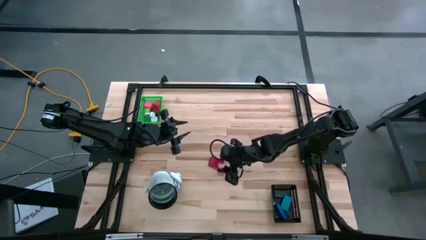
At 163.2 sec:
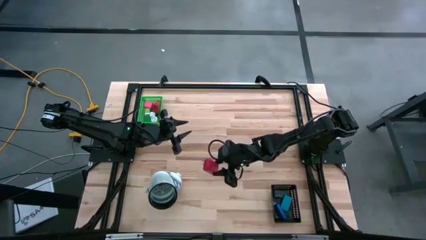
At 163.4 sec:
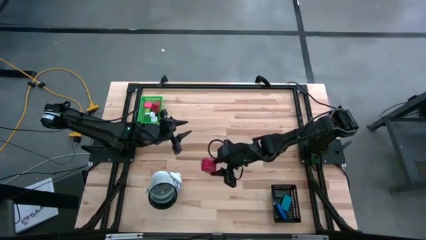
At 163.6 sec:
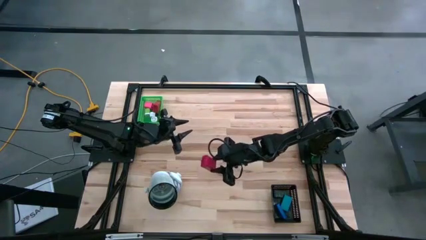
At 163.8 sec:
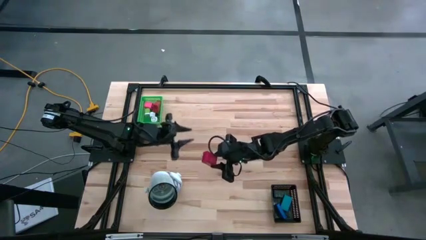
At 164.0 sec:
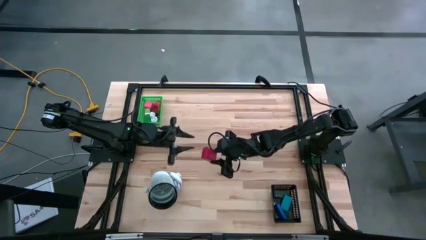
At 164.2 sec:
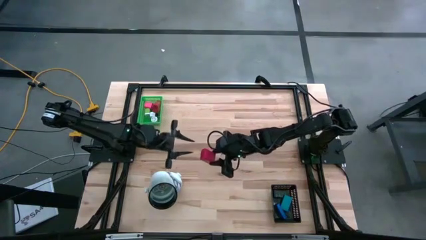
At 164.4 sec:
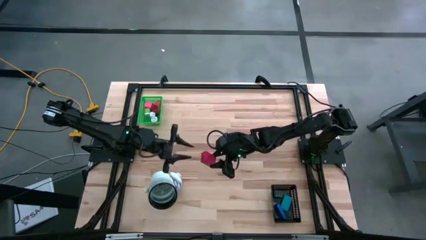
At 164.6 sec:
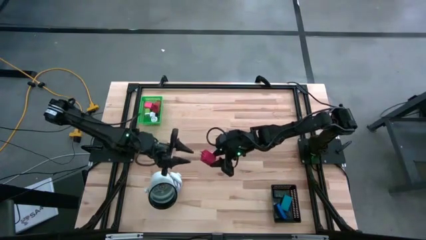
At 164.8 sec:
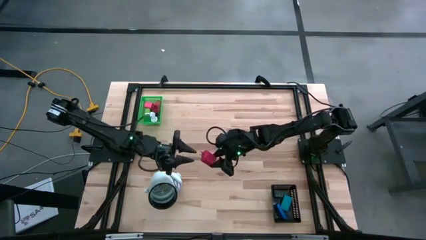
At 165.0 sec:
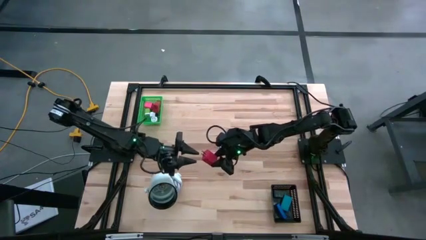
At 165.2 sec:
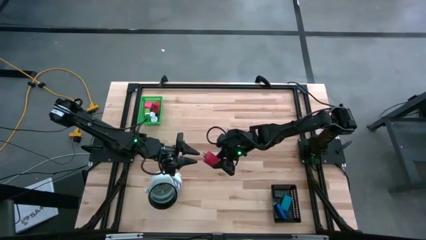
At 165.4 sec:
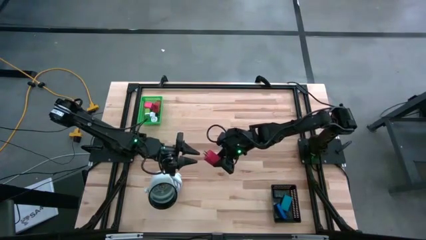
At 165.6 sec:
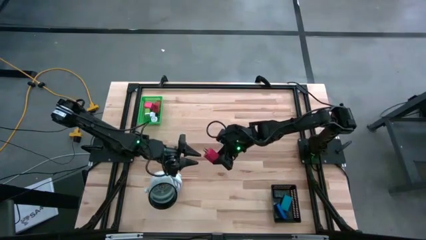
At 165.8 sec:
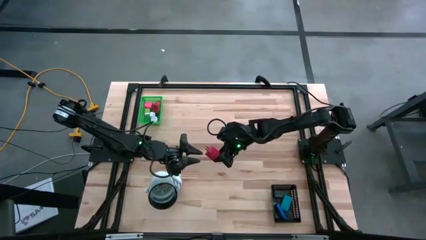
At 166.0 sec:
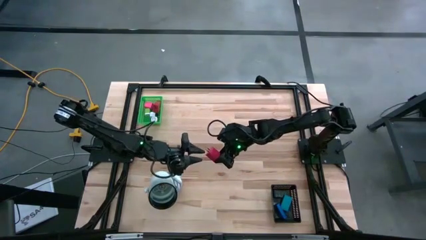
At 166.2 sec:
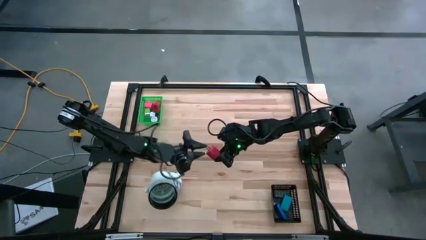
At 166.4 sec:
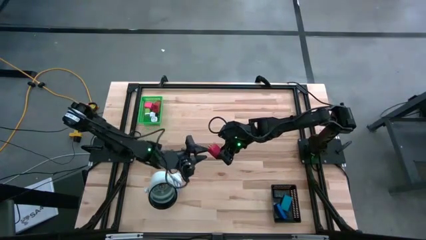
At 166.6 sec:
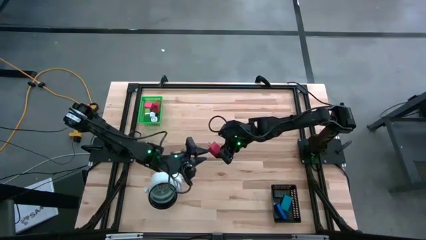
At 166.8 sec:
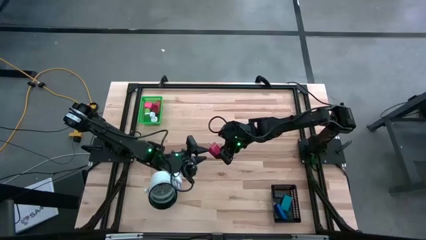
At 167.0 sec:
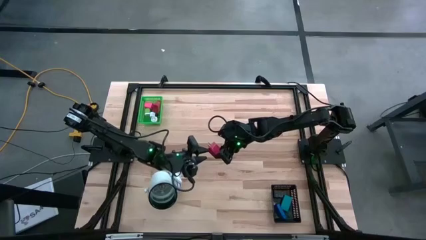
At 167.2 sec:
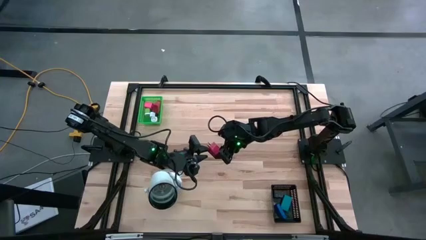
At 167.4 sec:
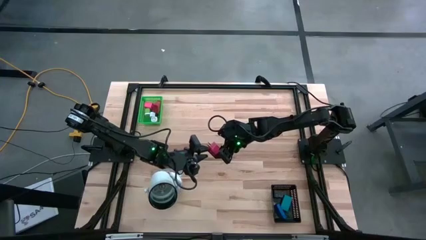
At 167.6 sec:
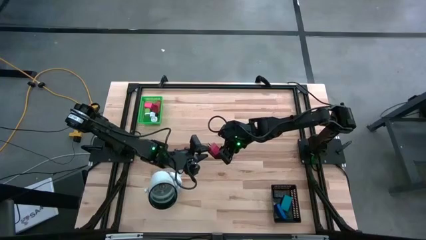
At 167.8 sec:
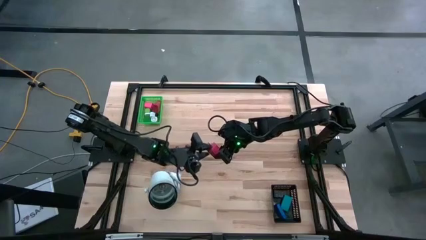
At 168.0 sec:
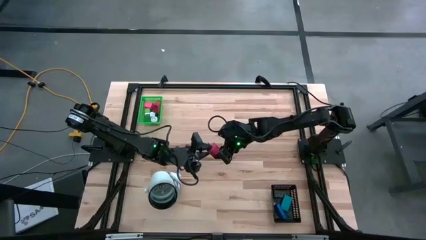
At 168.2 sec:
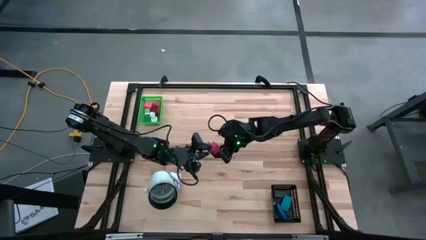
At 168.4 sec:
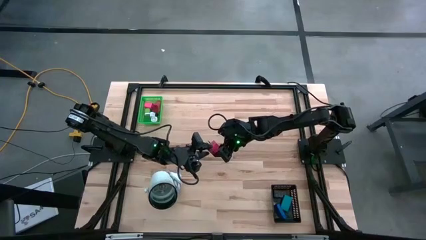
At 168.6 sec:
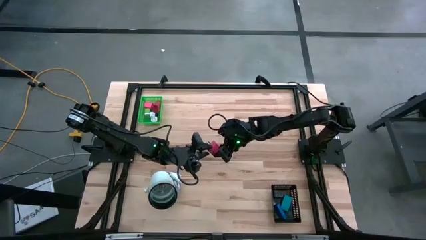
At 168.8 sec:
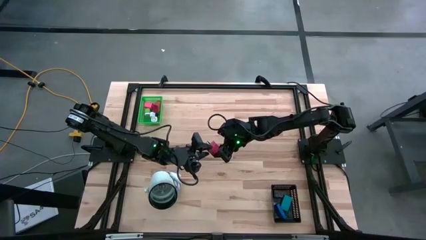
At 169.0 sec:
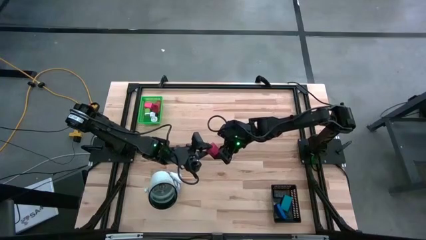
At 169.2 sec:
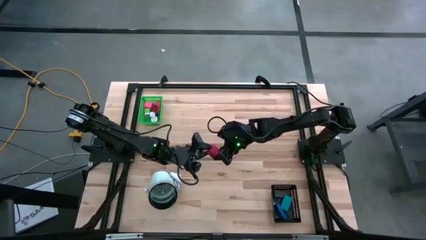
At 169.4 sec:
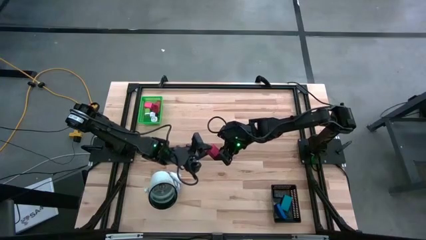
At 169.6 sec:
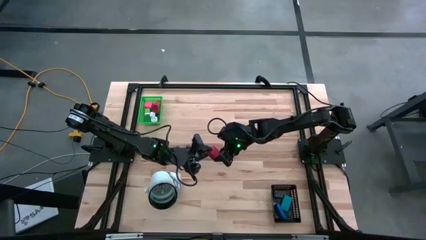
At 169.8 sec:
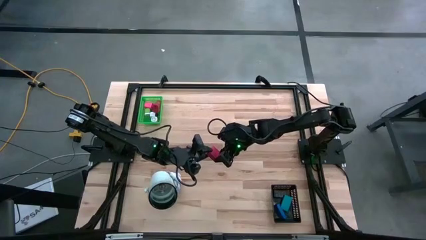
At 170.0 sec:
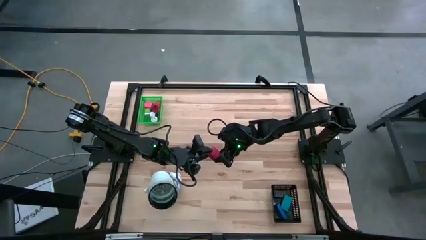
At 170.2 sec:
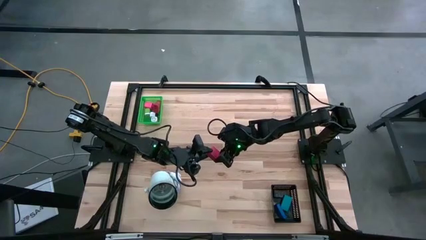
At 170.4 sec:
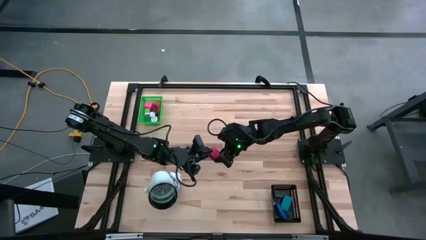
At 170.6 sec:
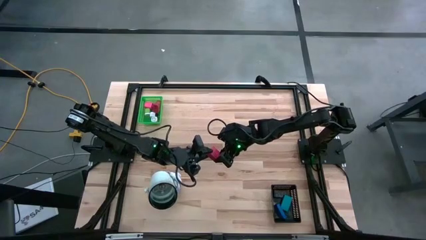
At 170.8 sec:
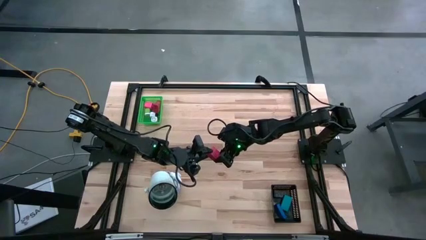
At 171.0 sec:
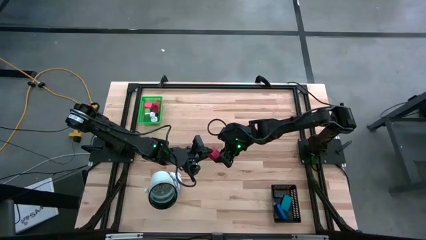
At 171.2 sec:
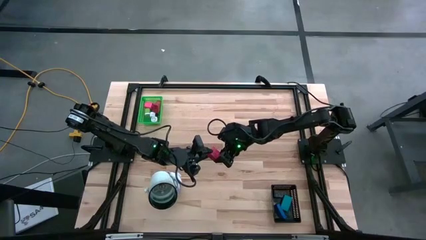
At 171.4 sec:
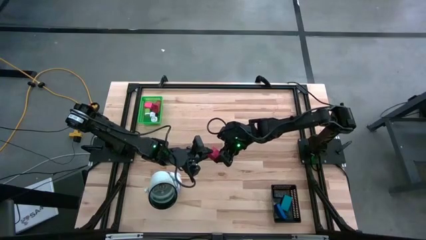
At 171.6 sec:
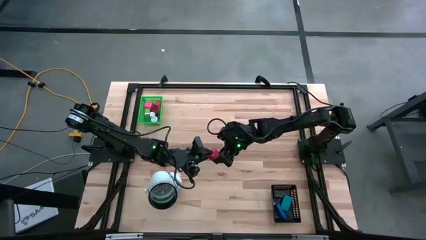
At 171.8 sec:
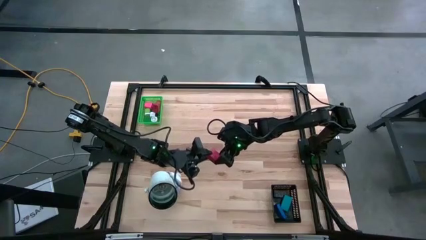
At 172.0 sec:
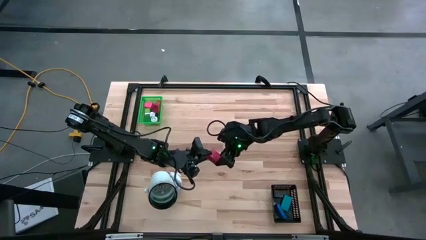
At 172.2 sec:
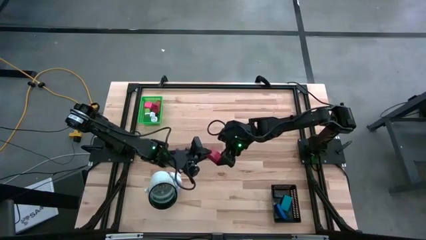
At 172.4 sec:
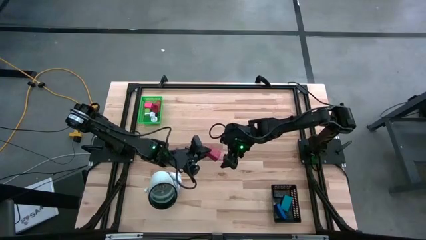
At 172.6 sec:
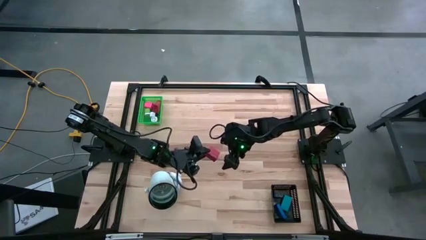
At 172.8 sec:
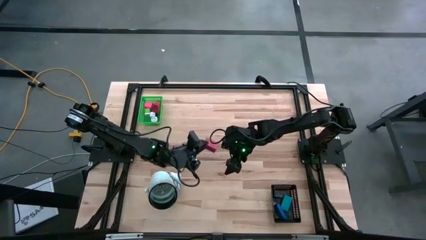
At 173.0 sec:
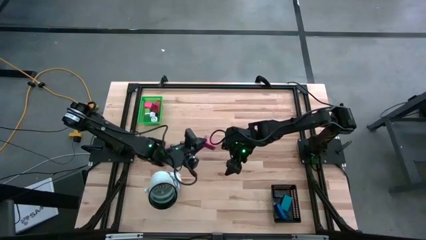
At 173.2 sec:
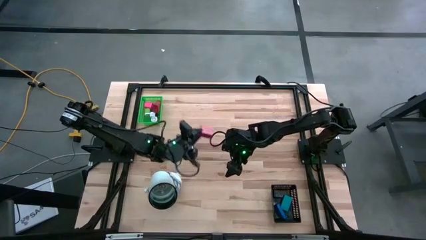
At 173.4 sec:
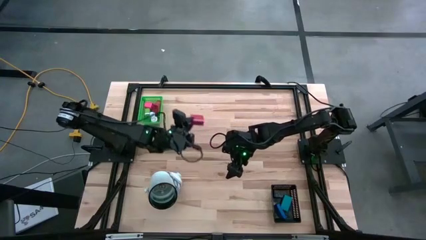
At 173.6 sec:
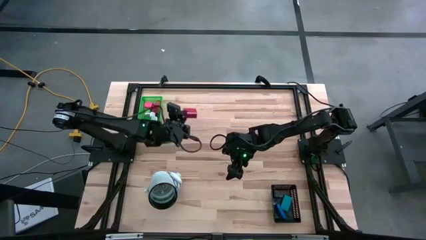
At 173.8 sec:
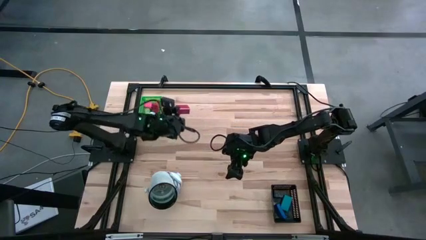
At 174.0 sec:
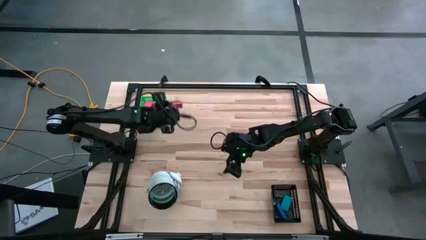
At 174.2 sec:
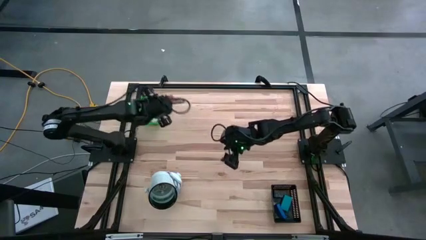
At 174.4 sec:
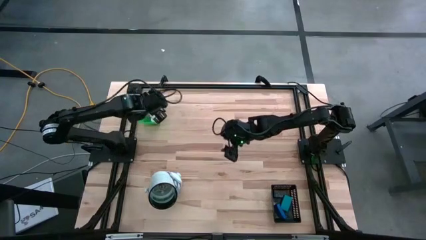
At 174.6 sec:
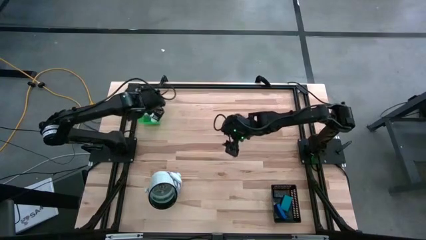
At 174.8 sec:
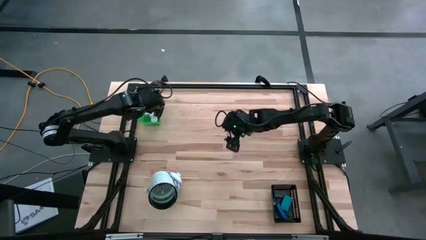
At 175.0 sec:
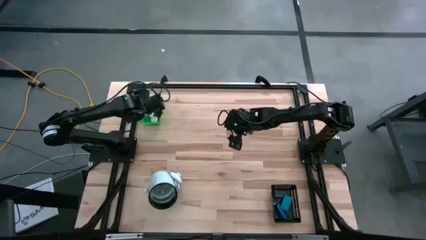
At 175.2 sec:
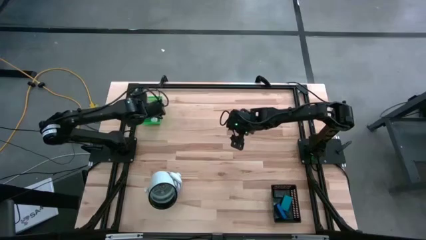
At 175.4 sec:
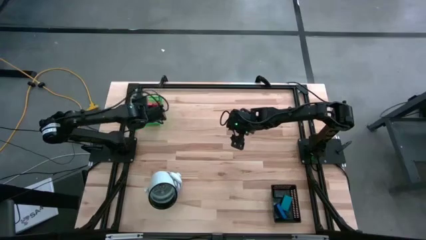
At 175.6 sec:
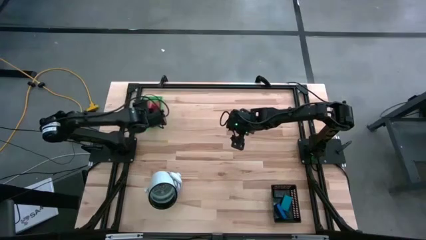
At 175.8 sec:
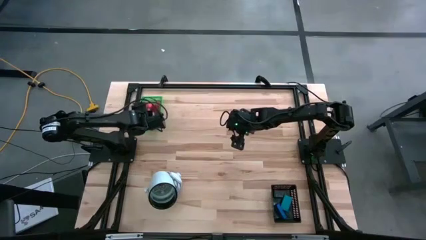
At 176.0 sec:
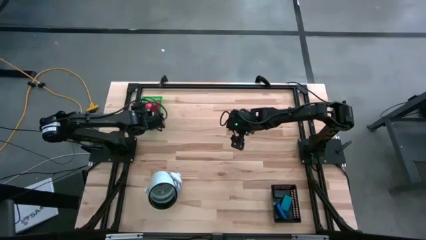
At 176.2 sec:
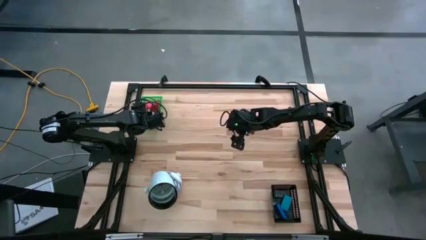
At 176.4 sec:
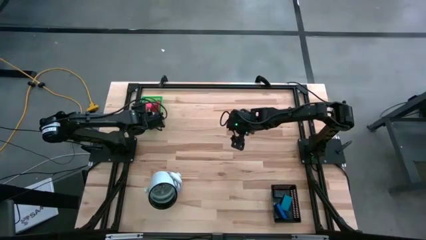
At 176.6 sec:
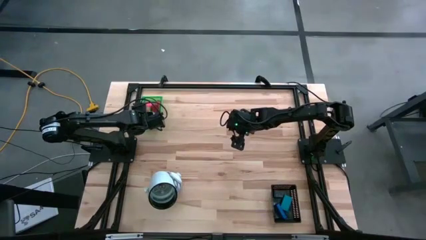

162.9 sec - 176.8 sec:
Task: Pick & Place Office items
Put the red charger adapter into the bin
